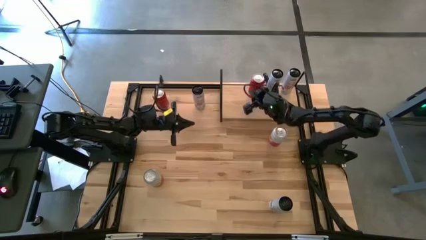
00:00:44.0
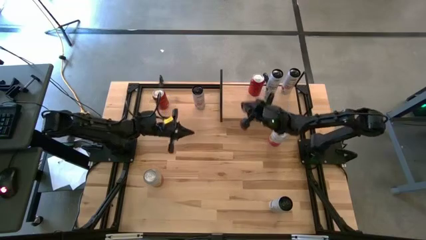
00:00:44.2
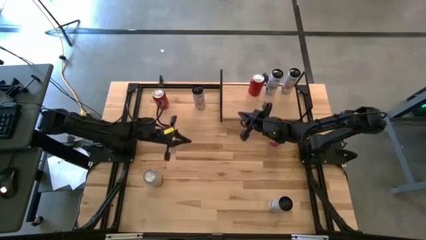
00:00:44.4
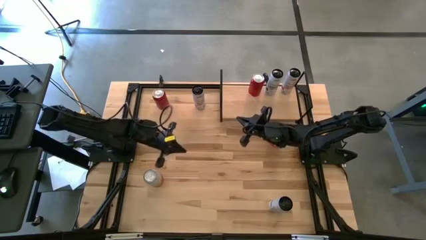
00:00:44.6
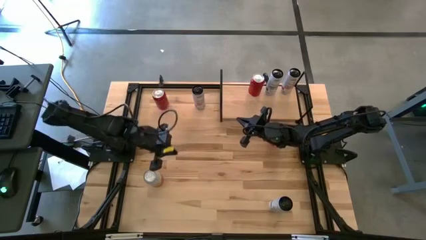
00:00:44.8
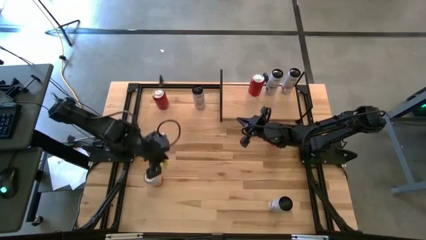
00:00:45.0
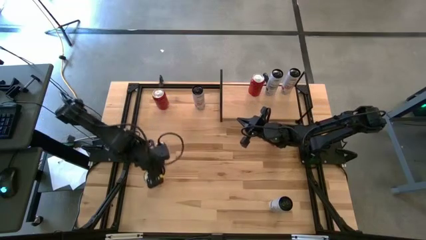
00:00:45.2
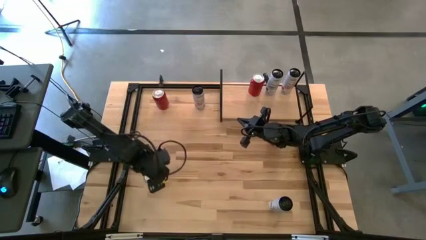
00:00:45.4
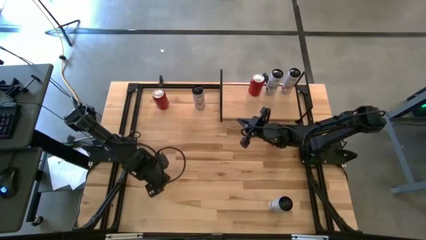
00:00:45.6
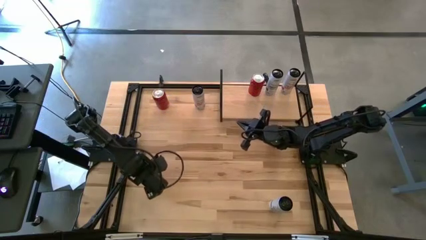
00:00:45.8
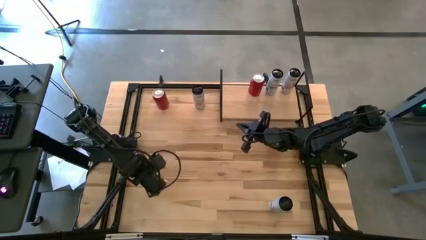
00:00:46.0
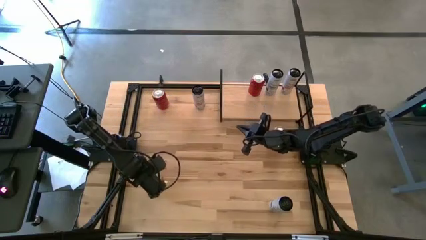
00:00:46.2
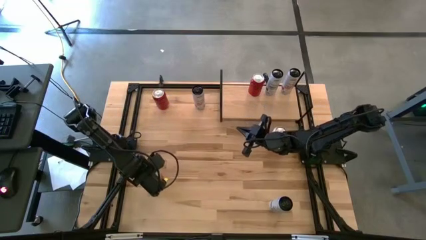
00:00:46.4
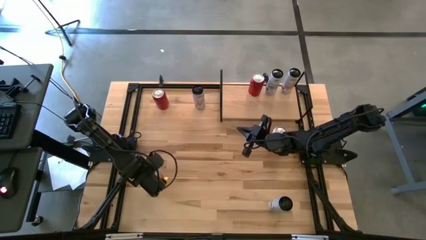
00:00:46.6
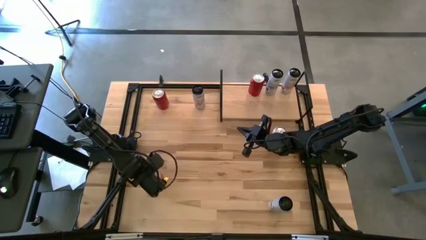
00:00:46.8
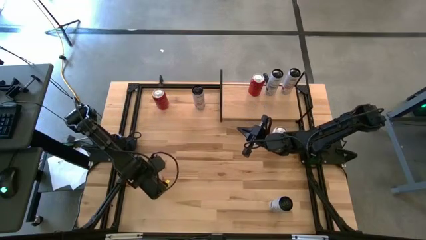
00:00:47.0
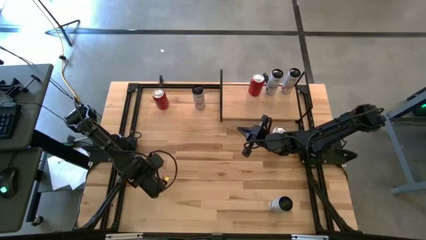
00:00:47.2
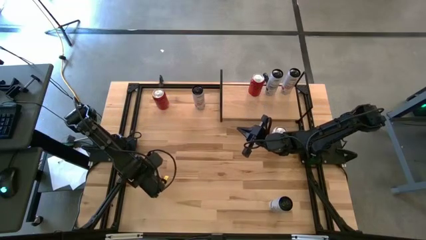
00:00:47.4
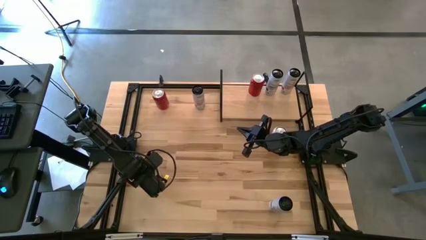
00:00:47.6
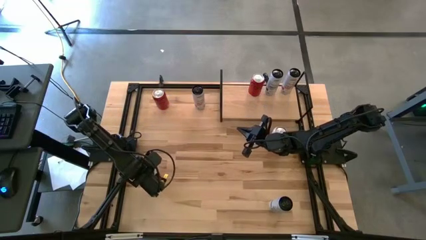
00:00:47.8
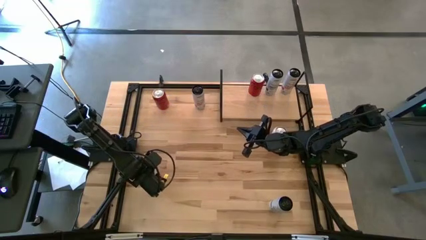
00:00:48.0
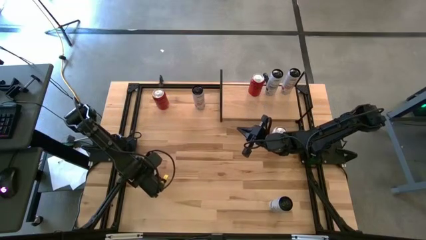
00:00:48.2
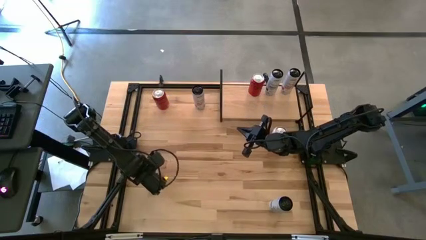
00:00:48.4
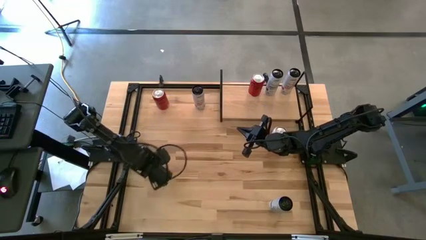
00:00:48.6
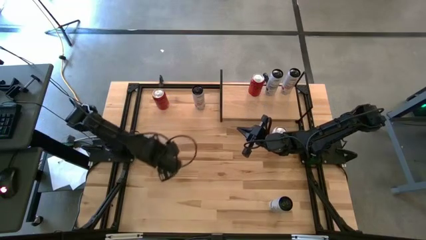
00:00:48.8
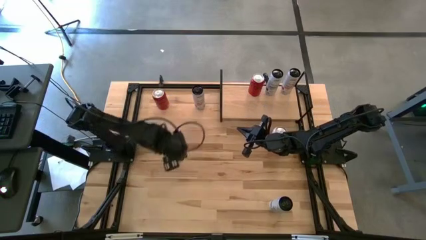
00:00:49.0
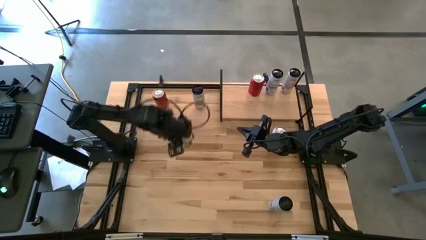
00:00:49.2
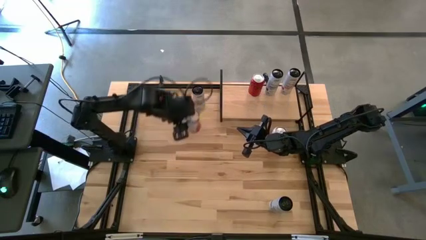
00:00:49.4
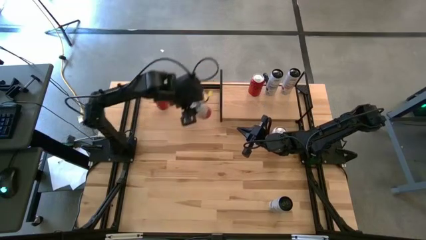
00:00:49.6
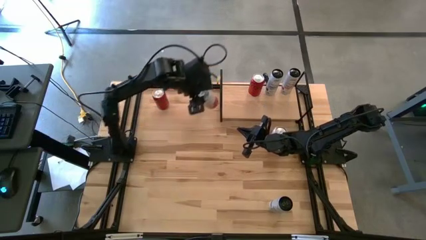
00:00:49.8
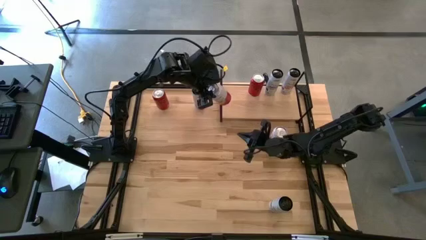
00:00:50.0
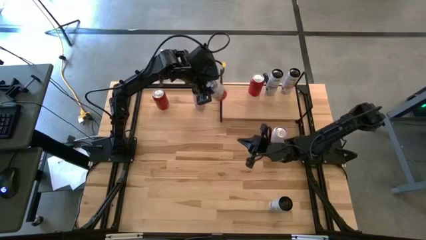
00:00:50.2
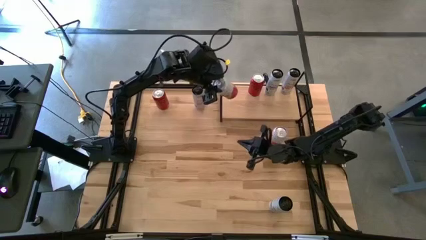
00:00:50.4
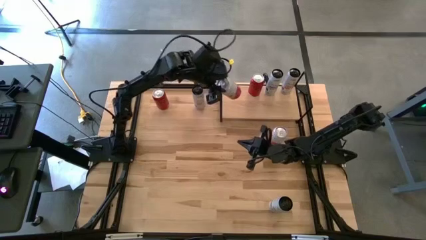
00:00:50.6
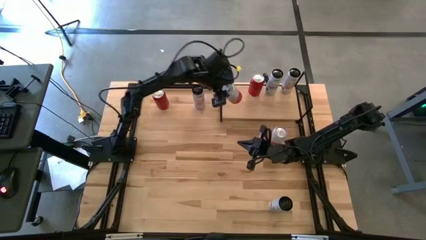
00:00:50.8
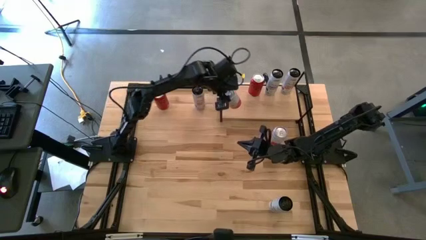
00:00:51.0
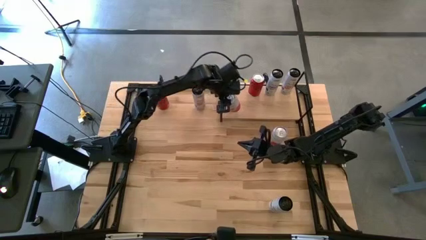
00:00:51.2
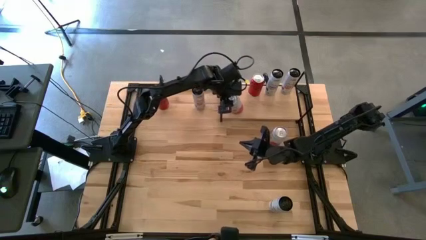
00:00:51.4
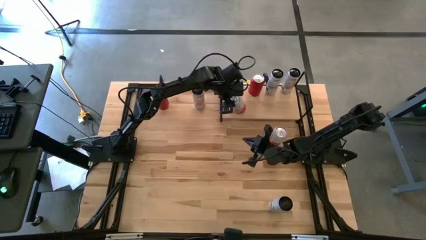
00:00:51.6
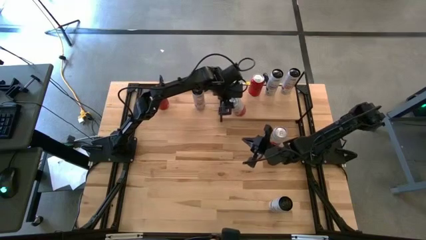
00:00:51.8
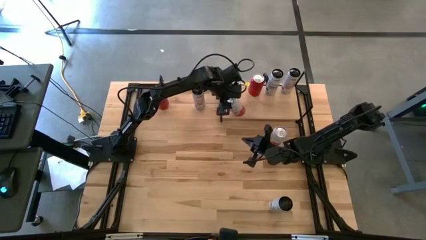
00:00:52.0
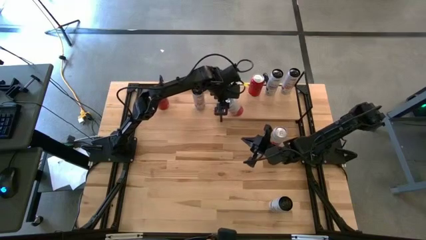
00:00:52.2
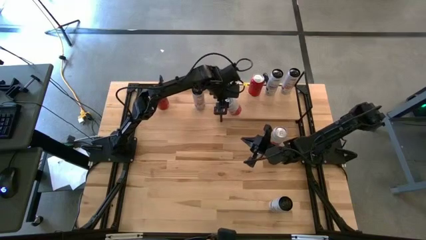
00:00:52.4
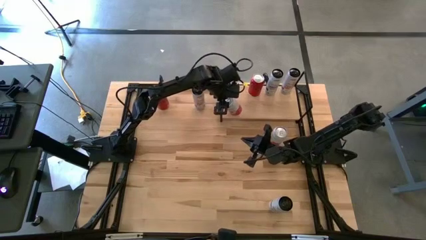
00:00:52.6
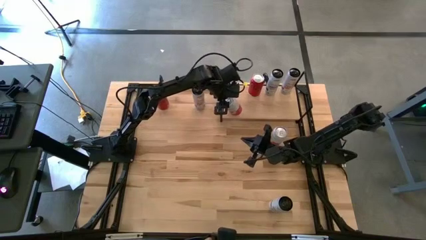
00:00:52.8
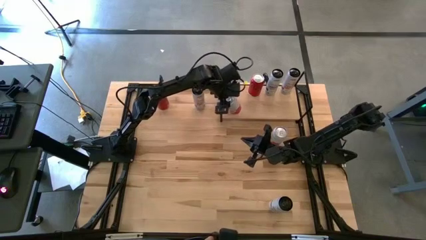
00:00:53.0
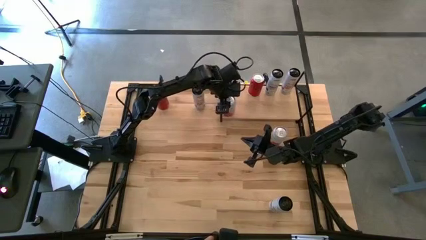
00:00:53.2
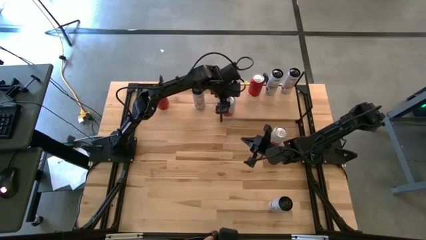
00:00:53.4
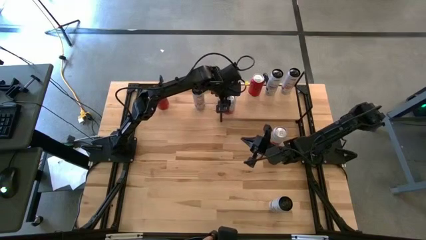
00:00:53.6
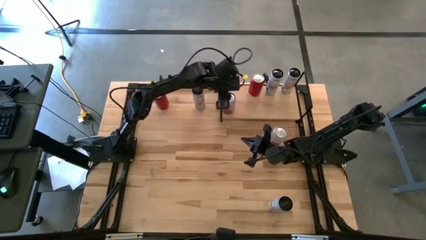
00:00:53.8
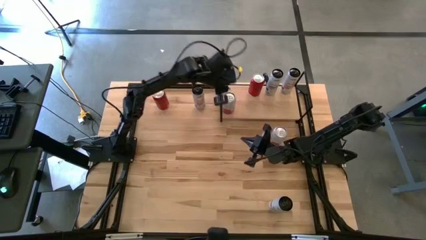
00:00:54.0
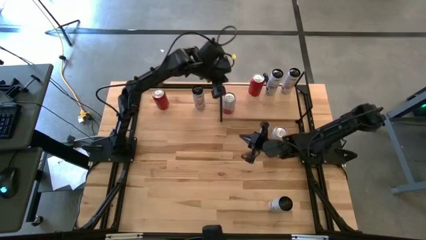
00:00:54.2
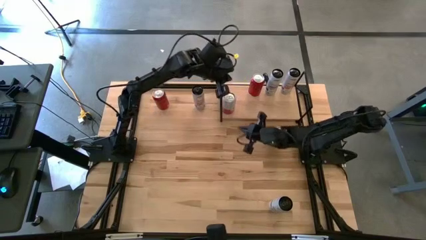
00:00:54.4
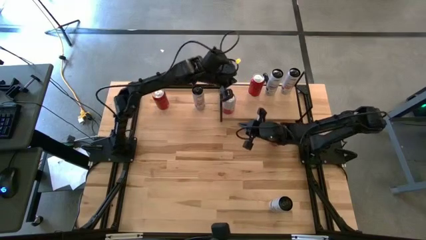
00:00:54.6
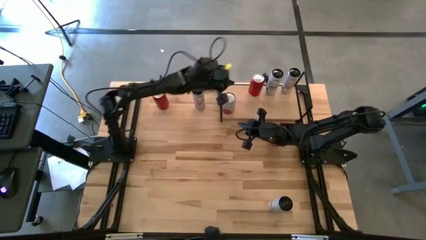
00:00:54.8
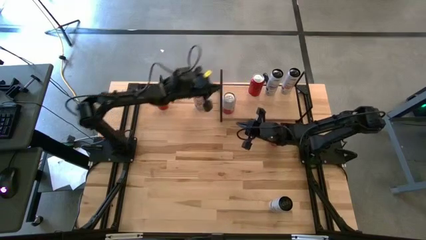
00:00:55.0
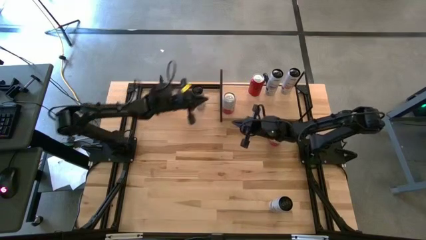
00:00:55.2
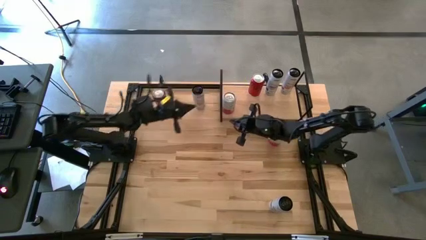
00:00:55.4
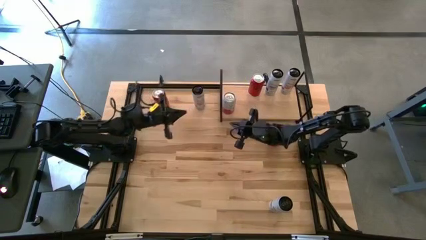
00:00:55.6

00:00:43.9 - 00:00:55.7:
Task: Place canned beverage on shelf
Put the left white and orange soda can on the shelf

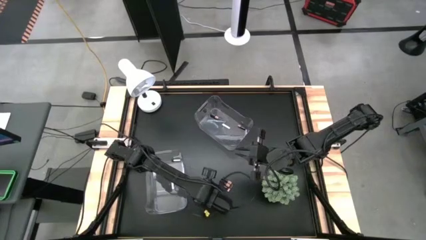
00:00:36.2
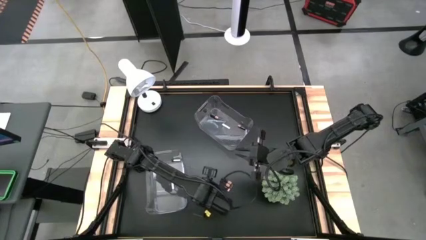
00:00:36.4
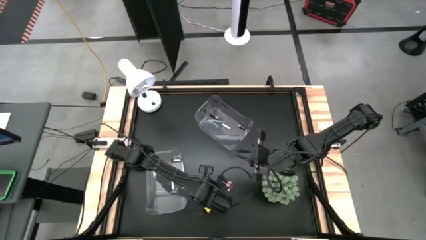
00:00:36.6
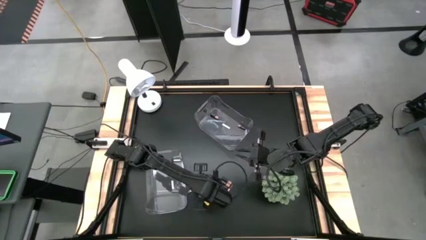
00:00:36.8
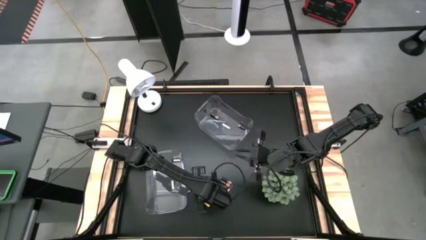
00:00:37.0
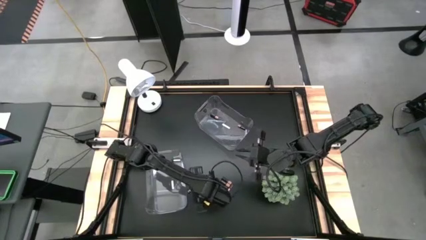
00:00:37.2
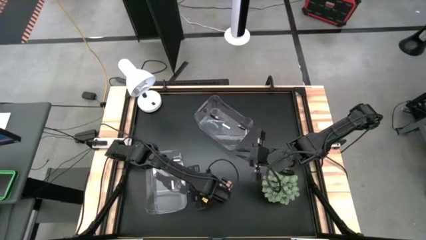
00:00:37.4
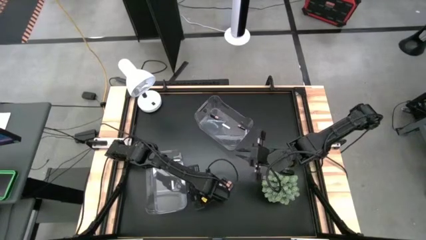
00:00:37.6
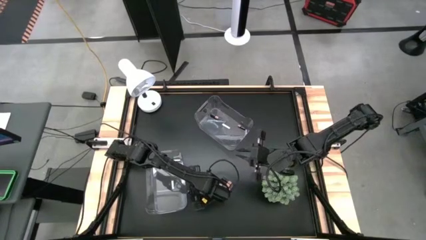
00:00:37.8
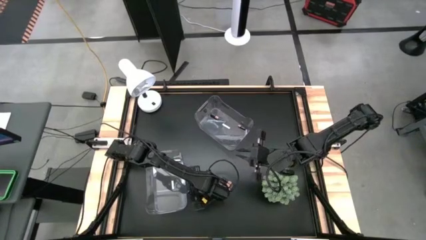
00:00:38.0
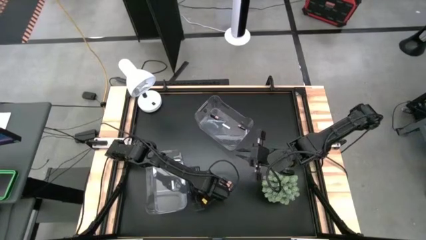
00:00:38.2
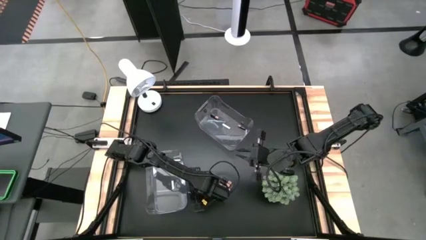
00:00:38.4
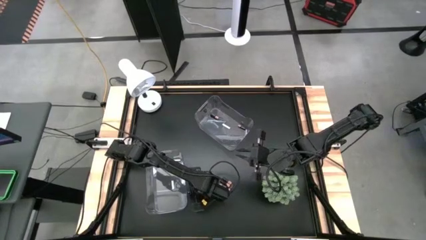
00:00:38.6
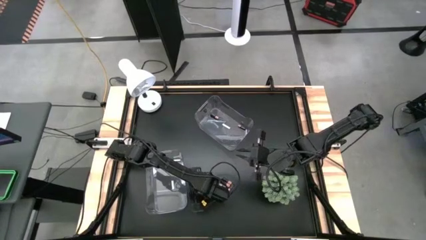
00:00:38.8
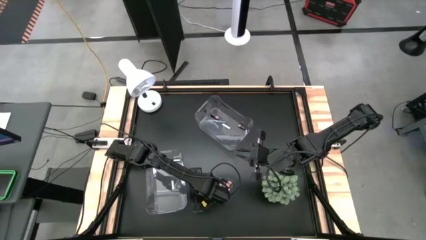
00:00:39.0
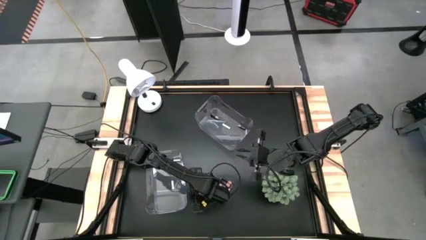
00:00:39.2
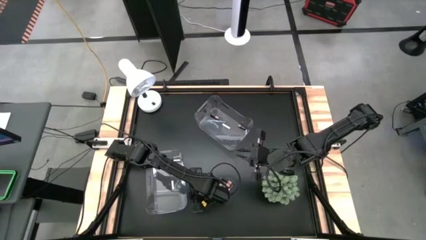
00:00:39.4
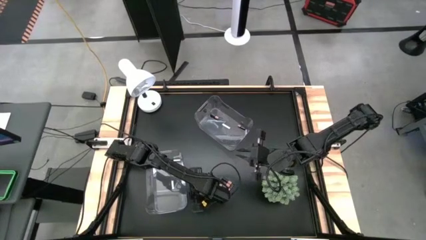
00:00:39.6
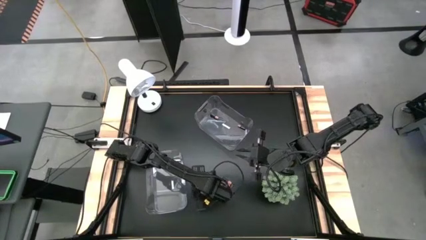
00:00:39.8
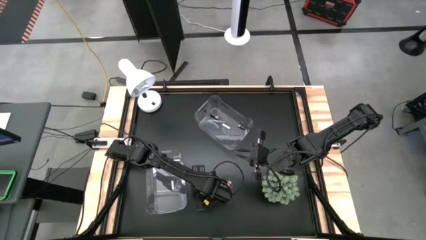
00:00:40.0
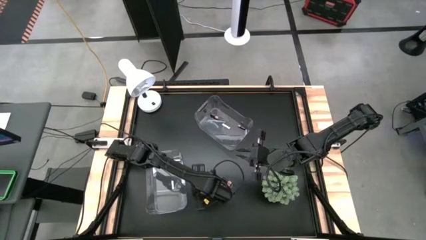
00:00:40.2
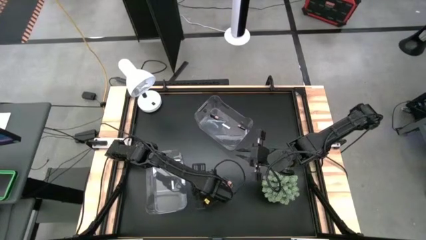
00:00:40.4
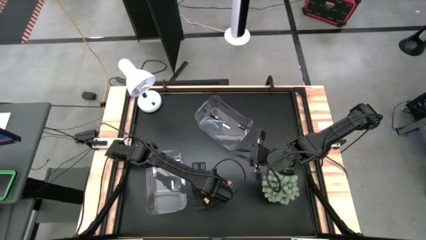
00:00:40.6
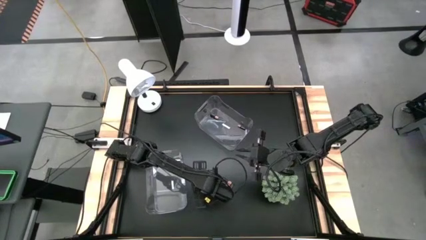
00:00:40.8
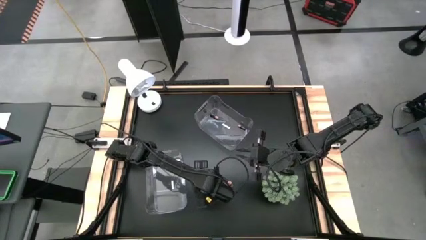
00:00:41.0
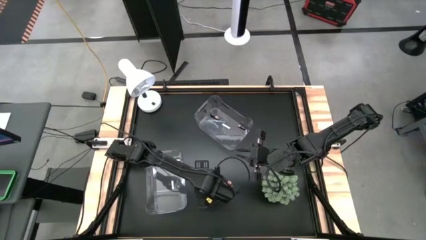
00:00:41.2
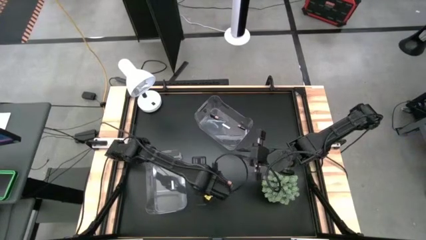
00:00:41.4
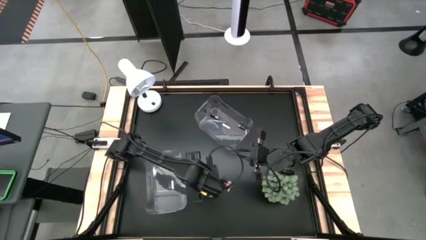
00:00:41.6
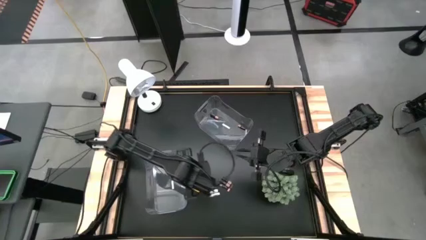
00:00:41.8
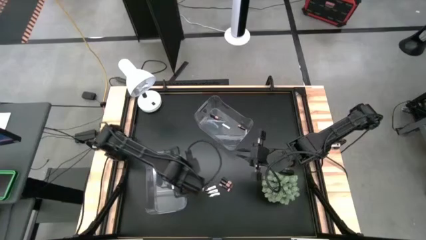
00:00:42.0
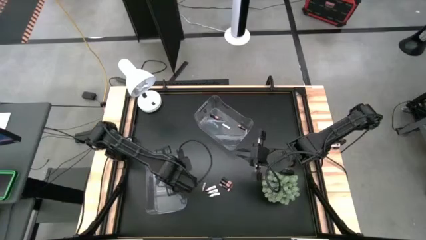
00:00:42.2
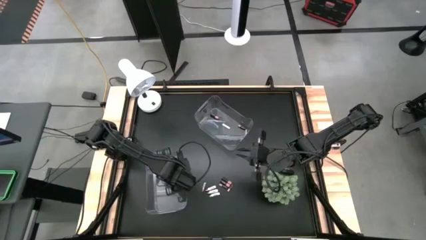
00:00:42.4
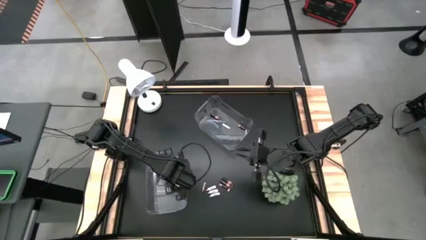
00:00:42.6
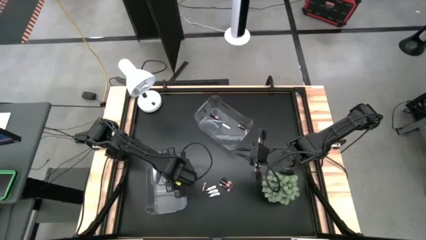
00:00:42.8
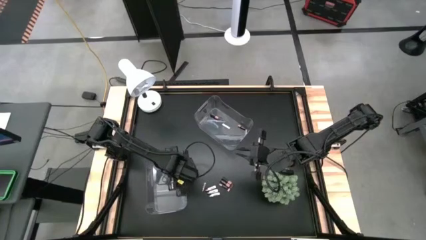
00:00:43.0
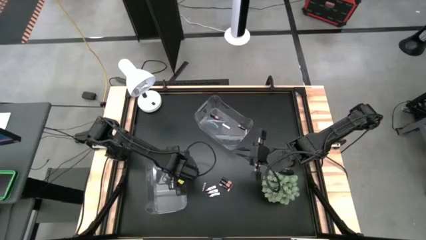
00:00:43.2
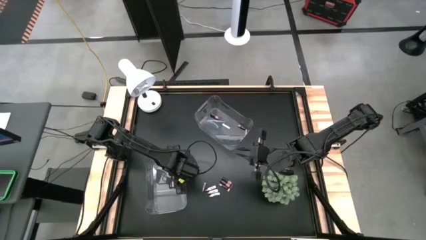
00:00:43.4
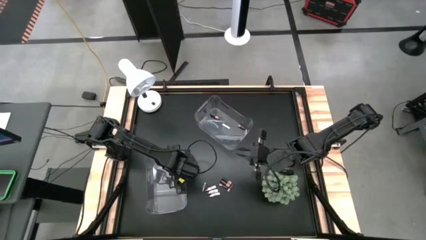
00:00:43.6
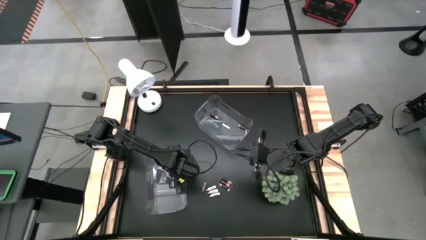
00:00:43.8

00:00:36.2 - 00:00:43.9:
Task: Sort batteries
Put the silver battery into the bottom transparent bin
